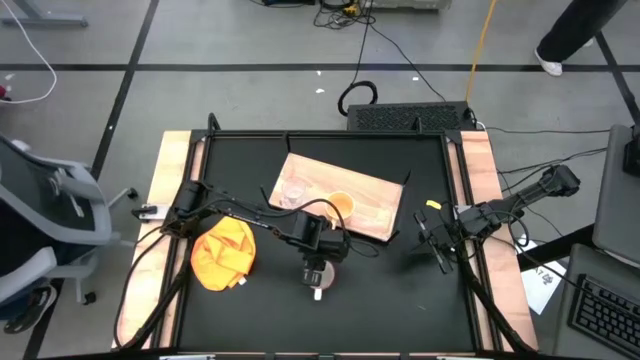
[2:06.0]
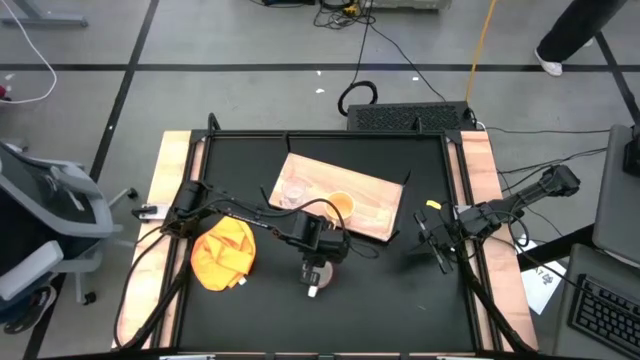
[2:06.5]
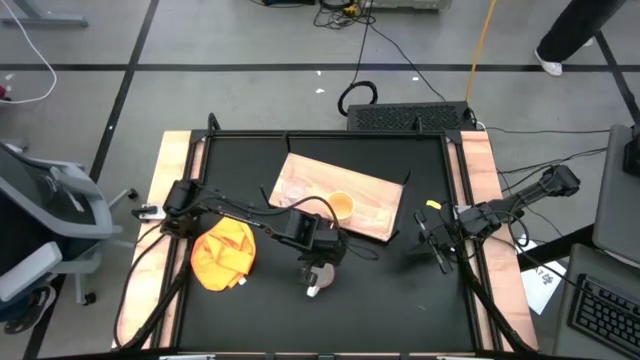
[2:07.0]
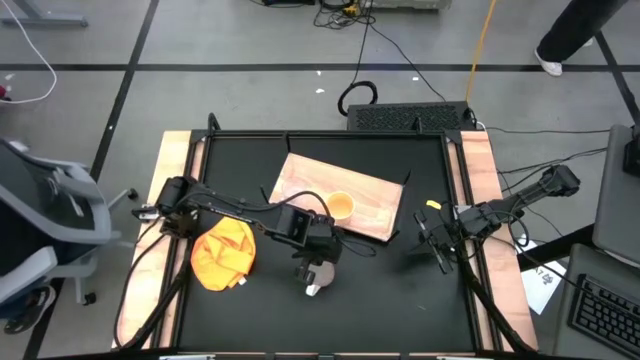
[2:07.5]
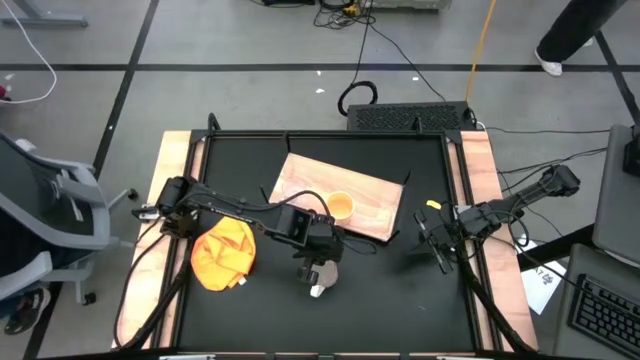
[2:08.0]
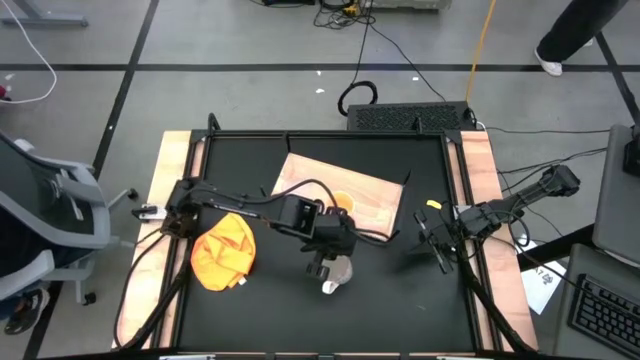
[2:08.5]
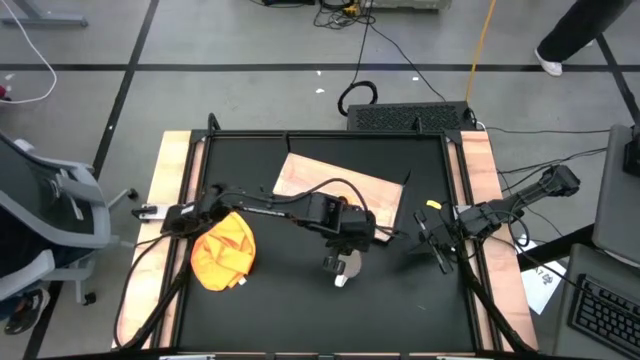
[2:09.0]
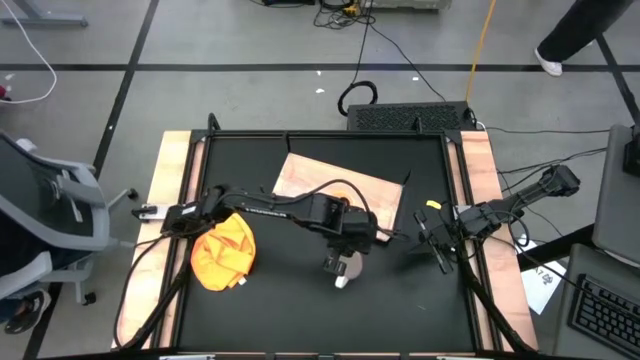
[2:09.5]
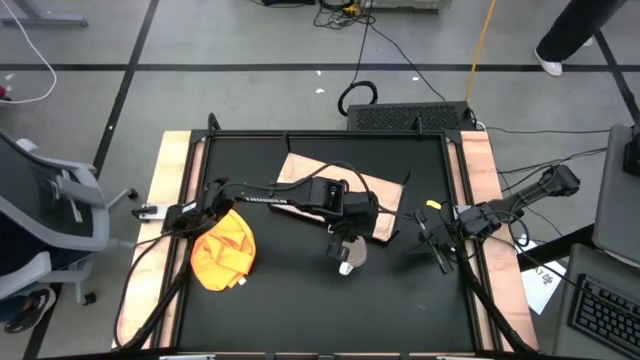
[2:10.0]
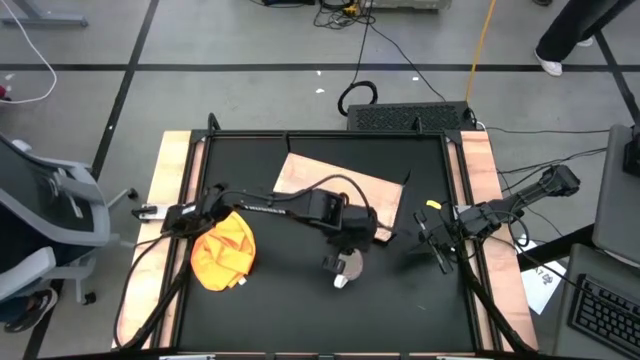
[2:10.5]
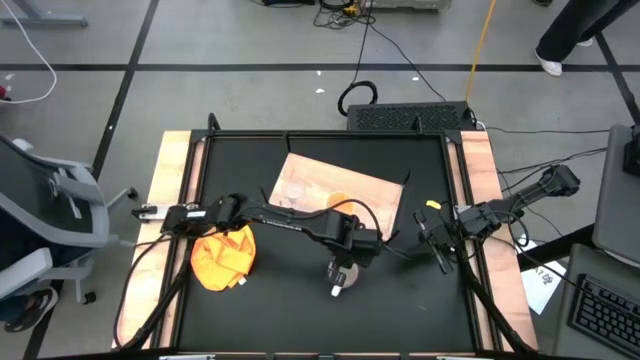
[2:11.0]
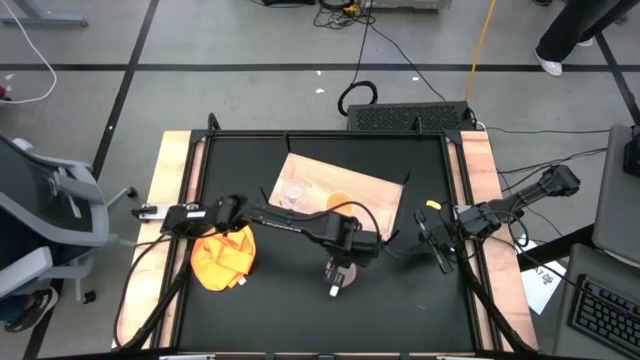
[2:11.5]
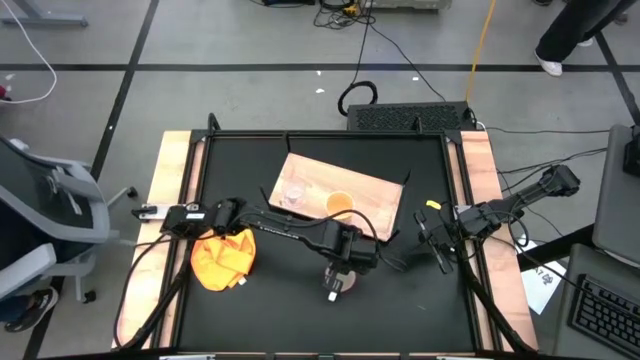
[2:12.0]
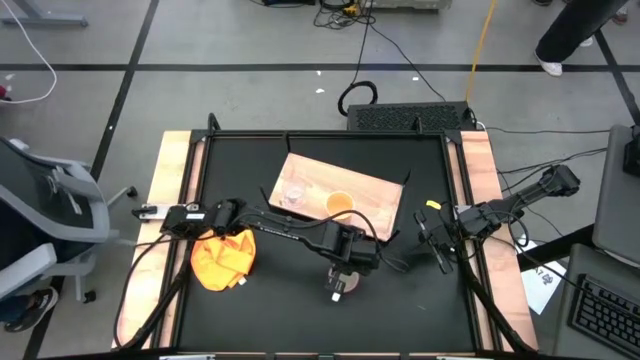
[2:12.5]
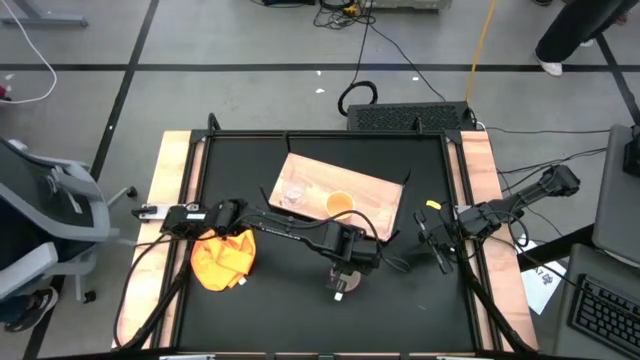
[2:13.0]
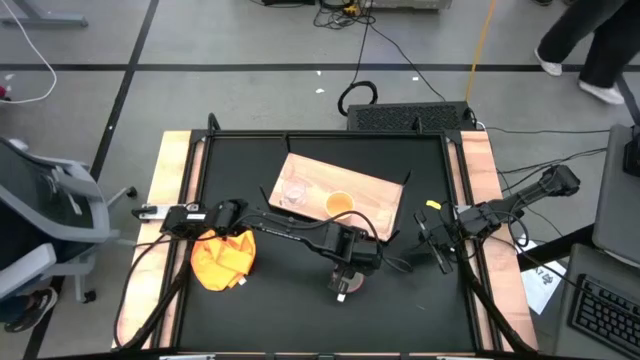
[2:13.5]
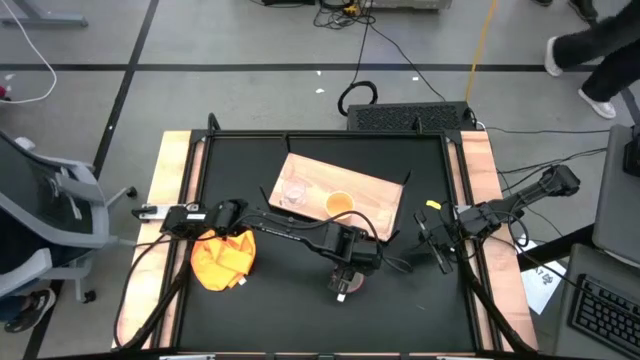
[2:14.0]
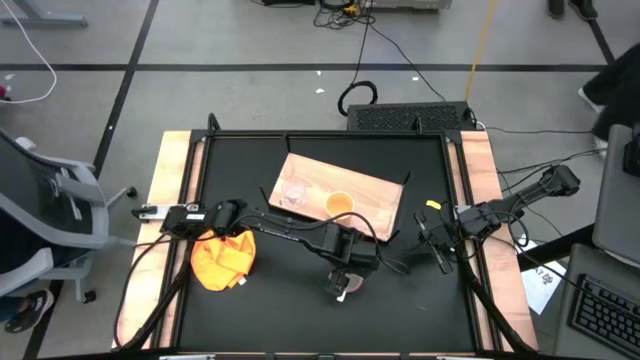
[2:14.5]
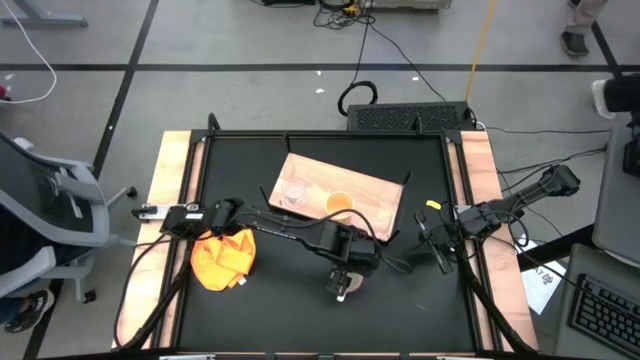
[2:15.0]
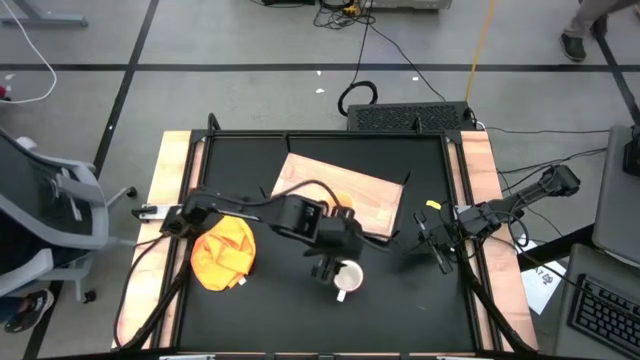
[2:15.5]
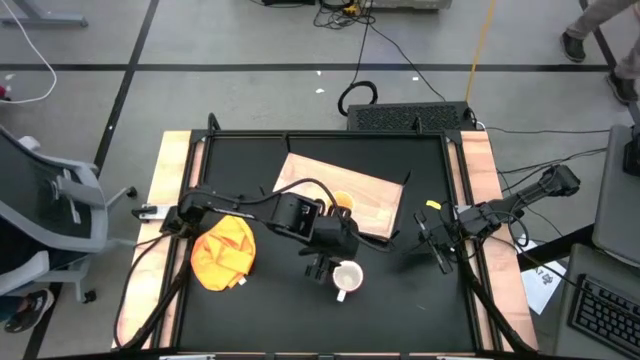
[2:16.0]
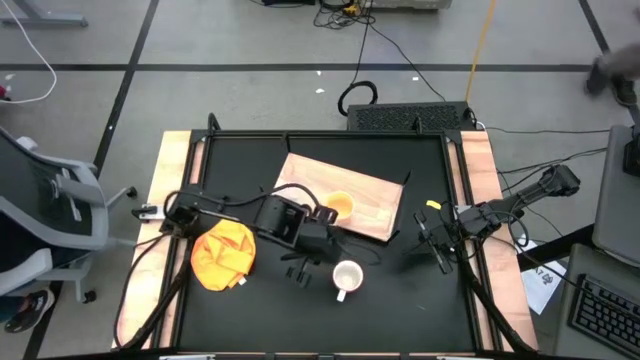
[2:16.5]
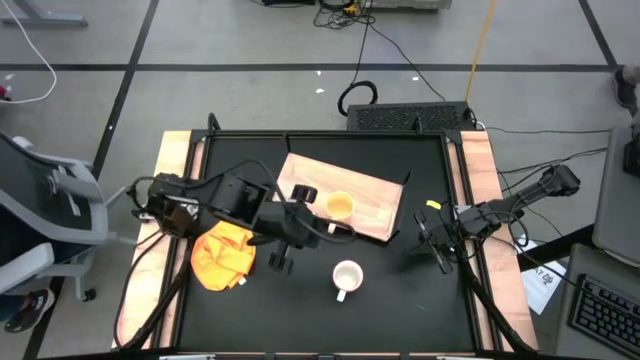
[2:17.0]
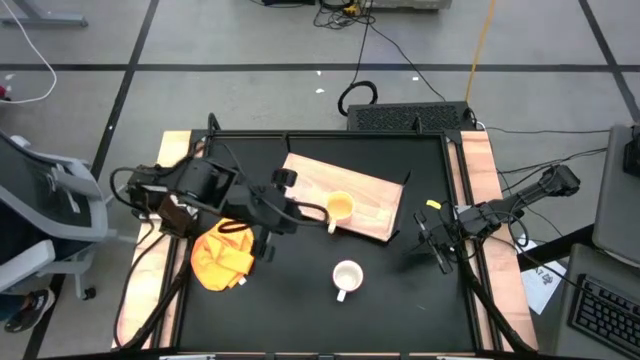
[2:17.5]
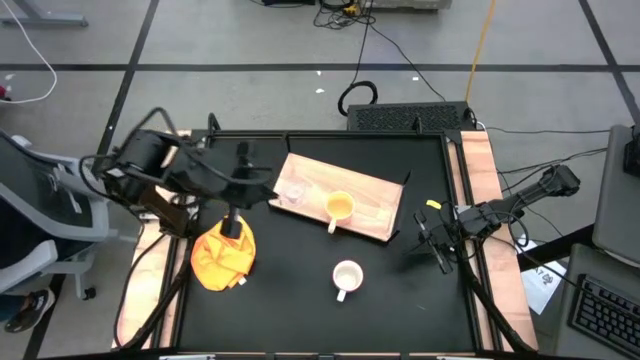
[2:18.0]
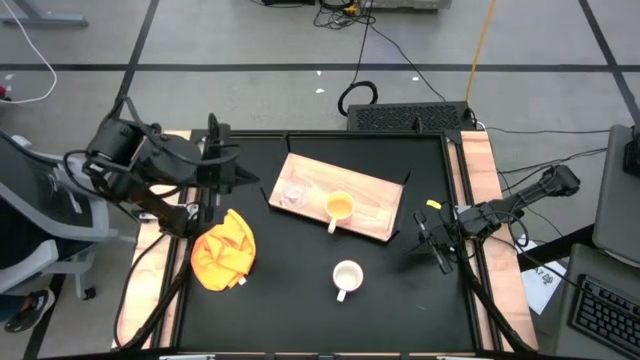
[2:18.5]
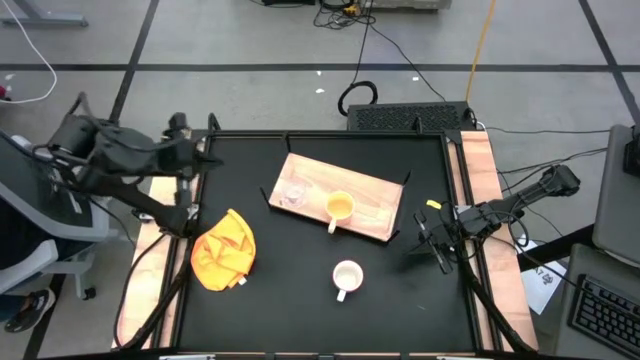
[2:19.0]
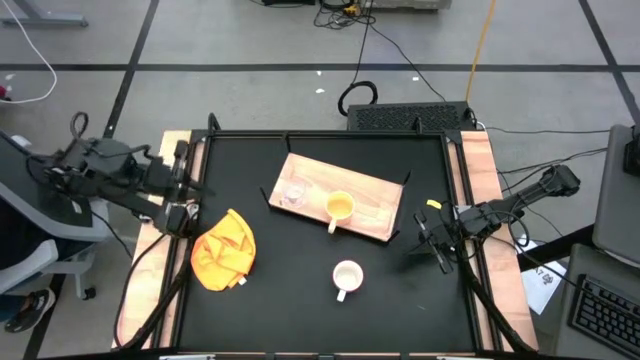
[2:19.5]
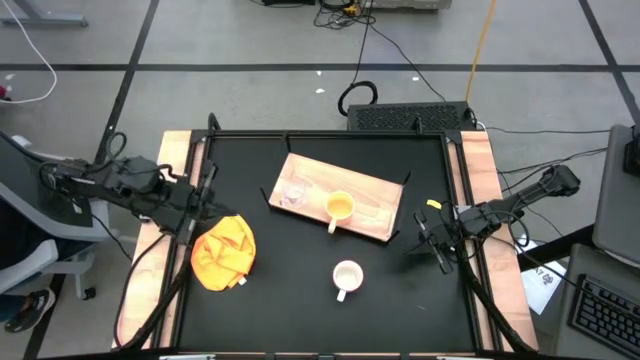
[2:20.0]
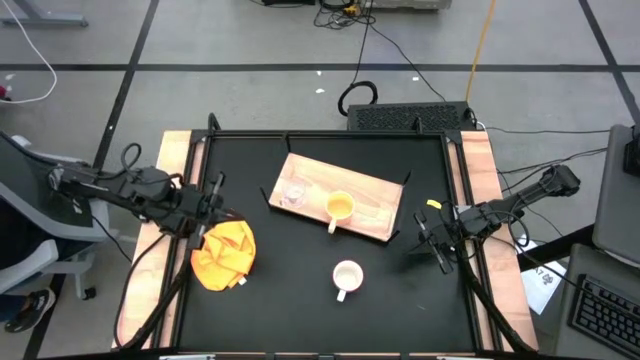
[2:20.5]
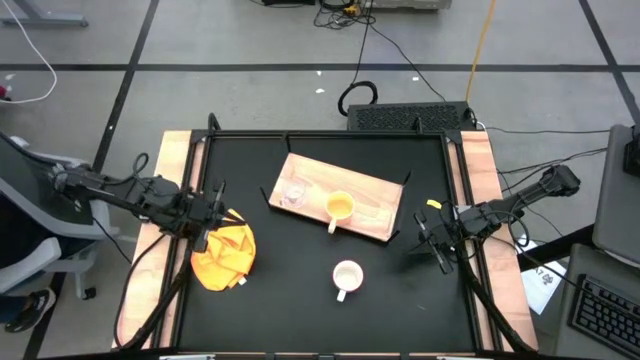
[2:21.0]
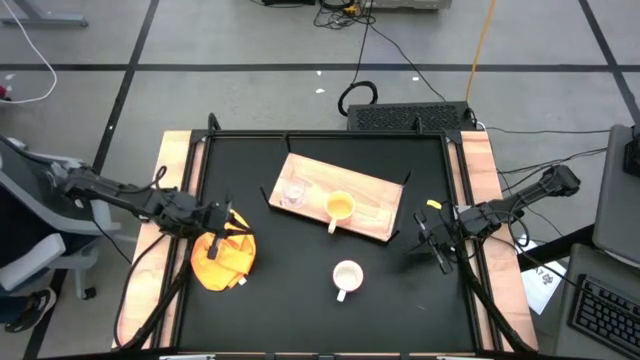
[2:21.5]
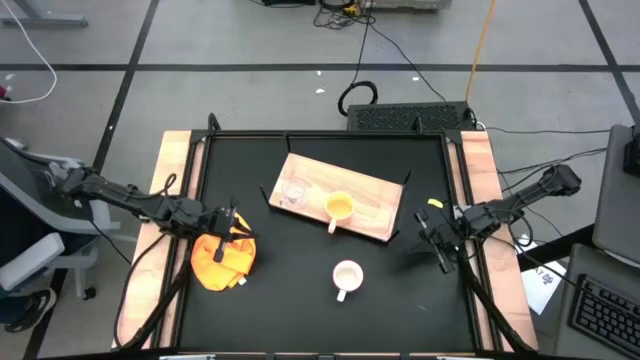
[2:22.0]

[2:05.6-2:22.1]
Task: Stack small to large cups/mugs on shelf
Put the gray patterned mug on the shelf
